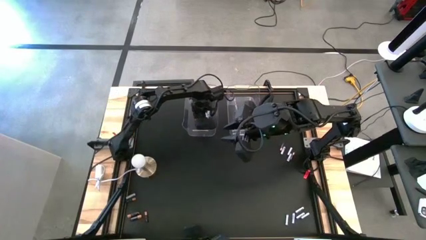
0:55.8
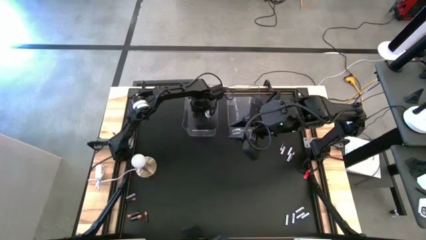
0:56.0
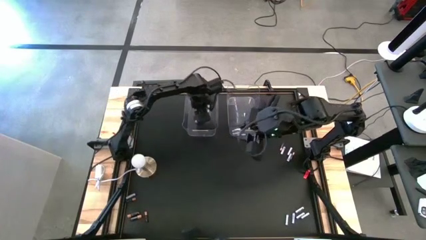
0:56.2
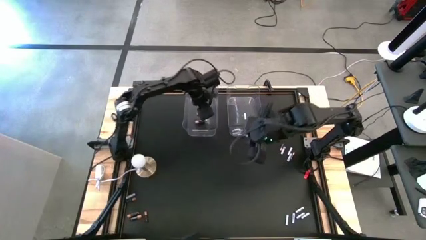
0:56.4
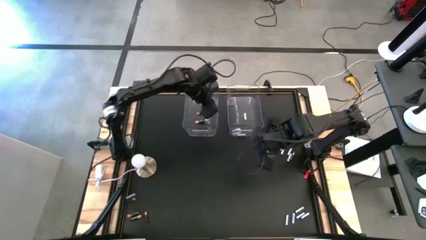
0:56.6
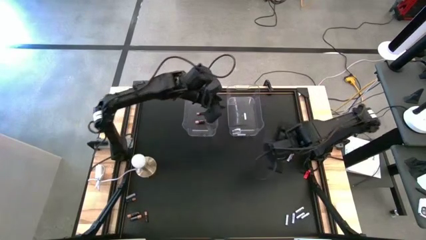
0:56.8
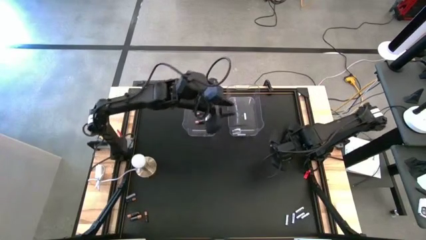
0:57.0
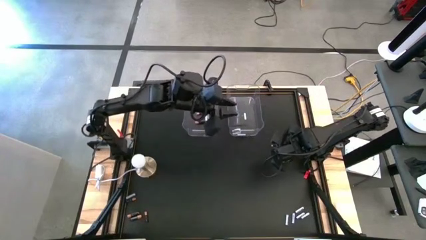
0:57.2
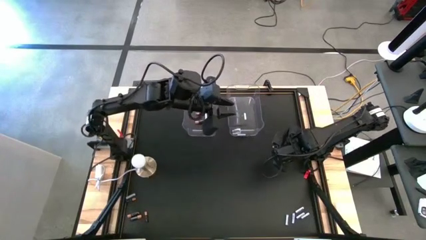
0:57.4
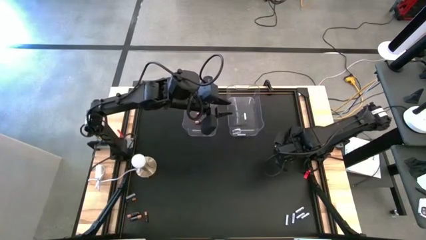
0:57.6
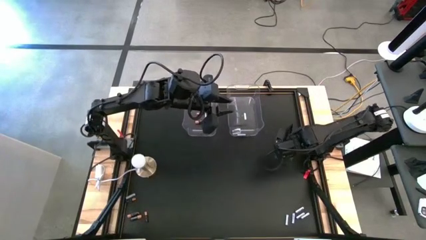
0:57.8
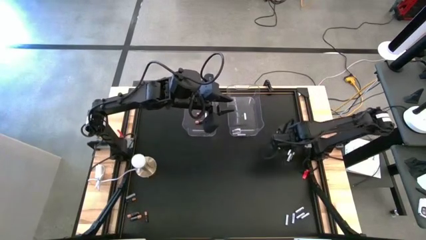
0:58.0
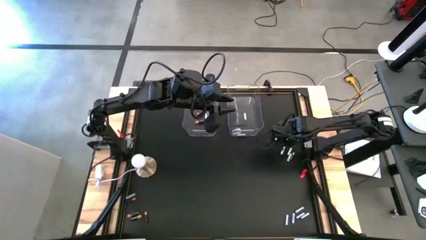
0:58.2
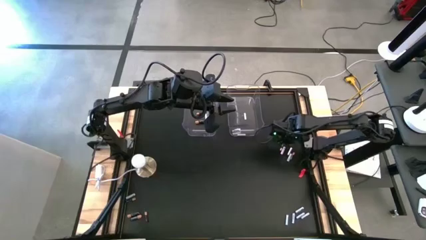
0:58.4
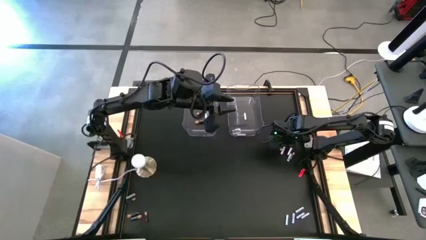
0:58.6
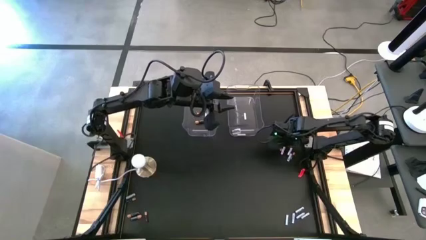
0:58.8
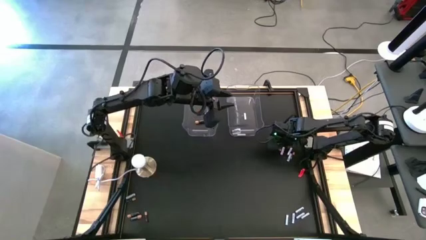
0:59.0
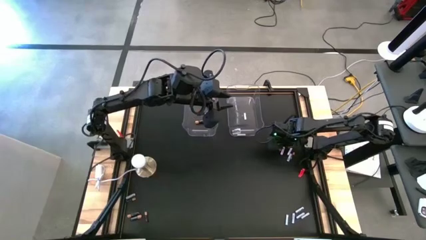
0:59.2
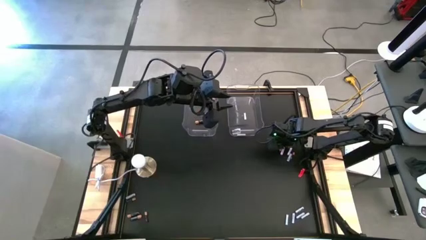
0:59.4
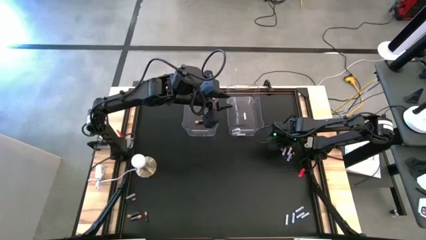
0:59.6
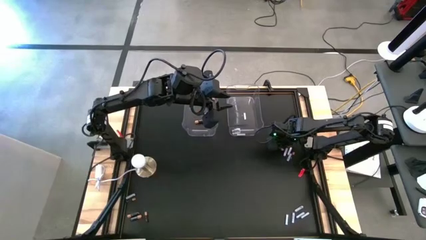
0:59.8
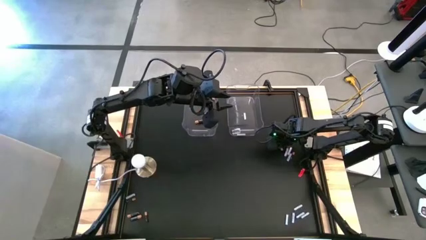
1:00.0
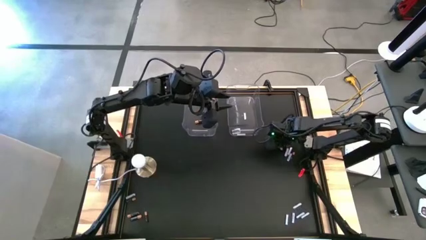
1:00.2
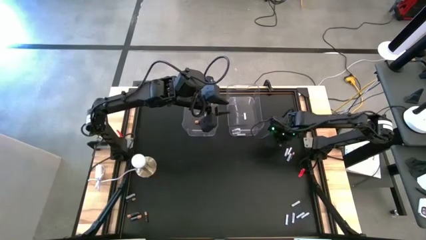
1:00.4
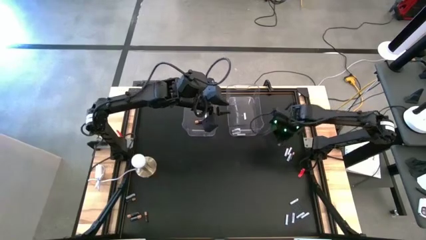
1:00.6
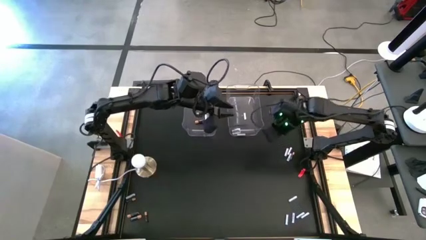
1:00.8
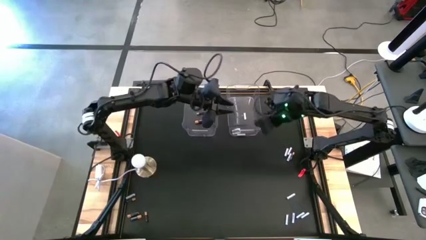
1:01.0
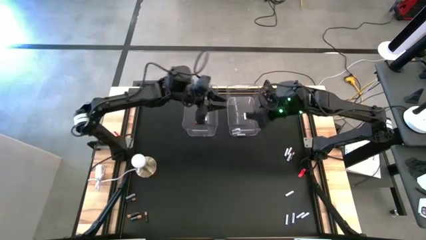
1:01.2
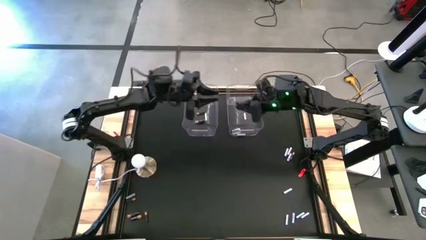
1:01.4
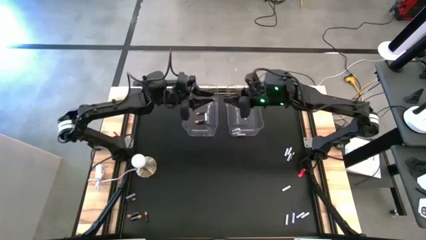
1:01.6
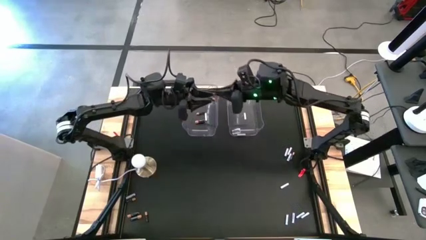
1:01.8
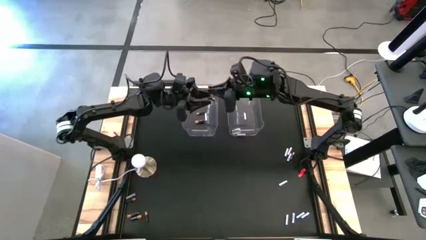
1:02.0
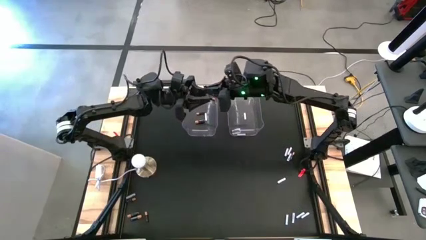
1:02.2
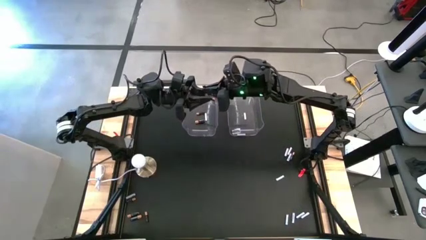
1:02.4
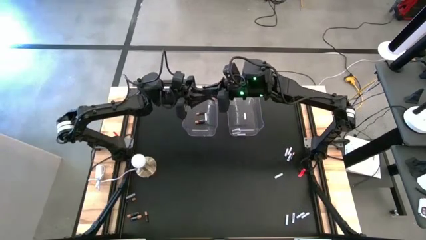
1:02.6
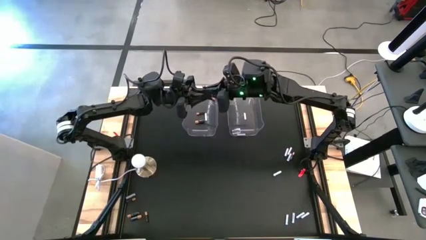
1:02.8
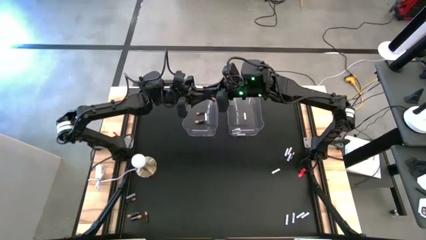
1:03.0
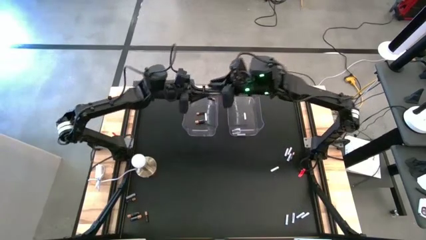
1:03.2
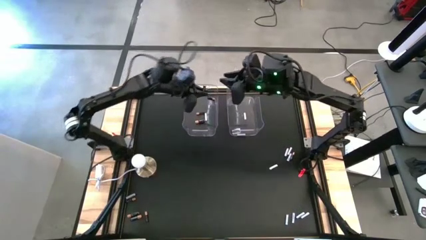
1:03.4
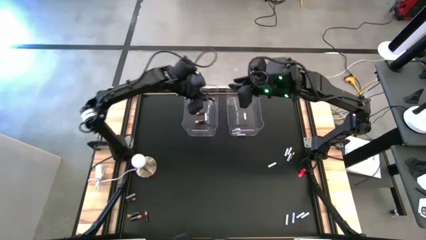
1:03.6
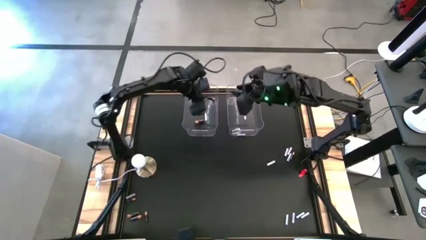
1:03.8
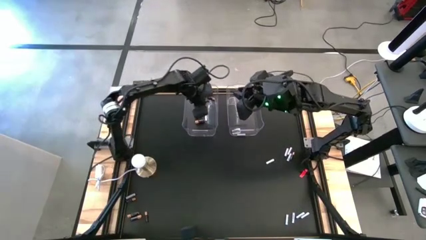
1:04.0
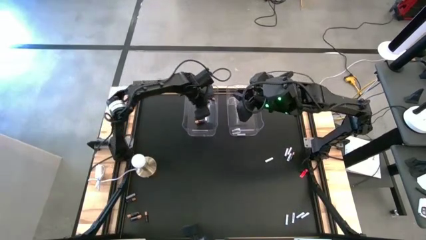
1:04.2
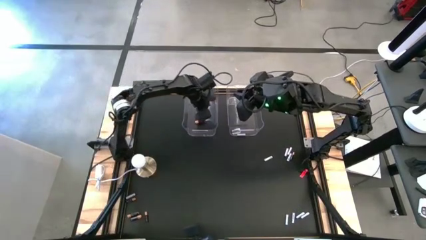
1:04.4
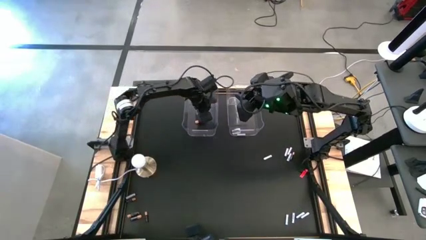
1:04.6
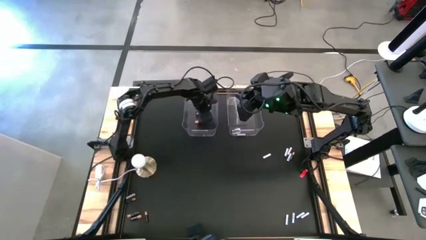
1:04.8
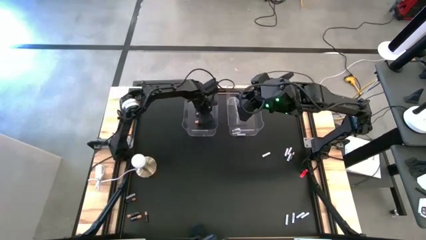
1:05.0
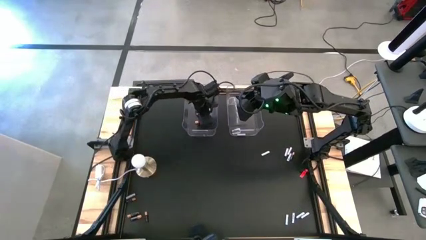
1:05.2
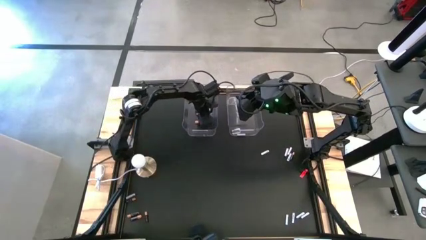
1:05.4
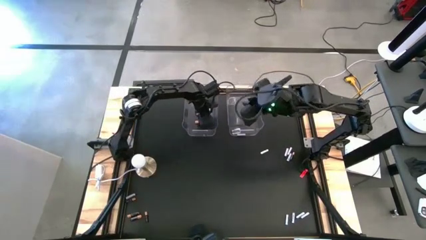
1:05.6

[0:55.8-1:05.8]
Task: Sort batteries
Put the black battery into the left transparent bin

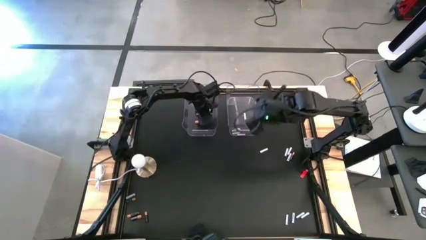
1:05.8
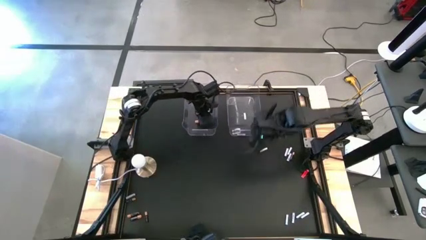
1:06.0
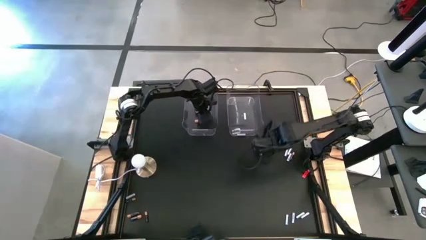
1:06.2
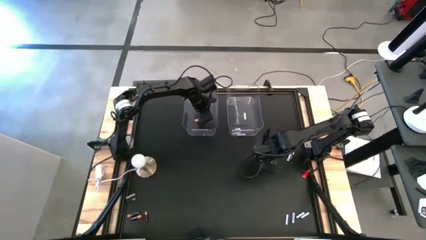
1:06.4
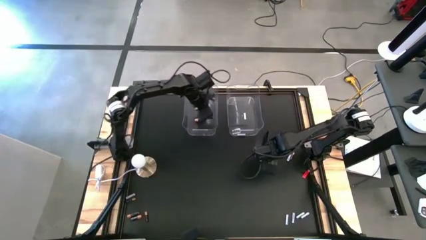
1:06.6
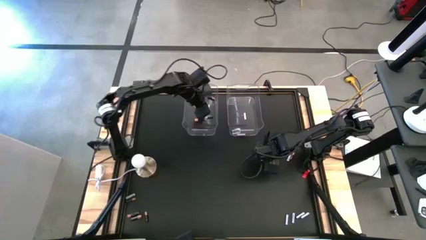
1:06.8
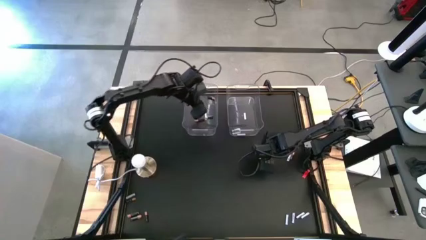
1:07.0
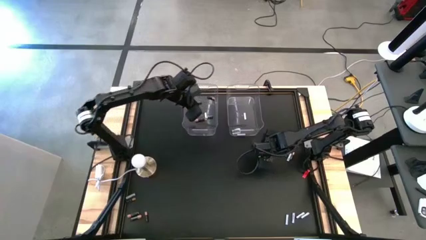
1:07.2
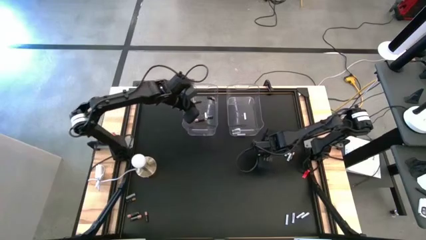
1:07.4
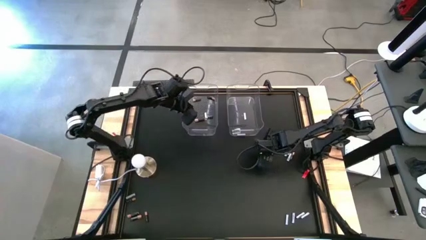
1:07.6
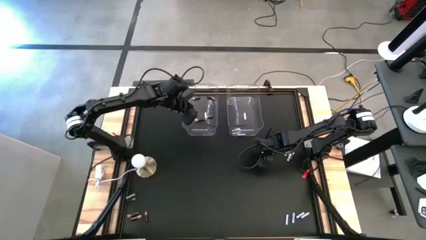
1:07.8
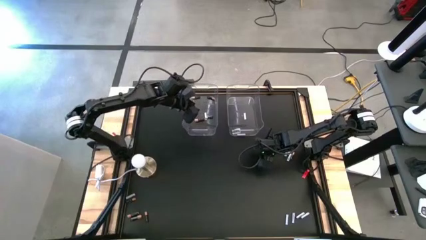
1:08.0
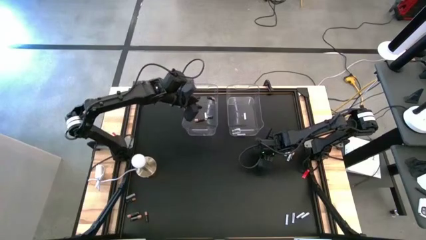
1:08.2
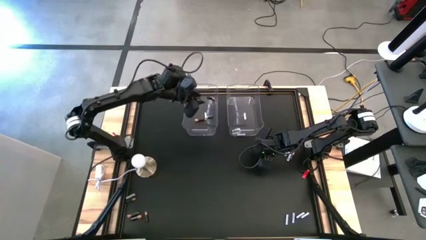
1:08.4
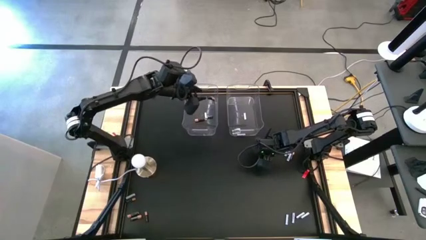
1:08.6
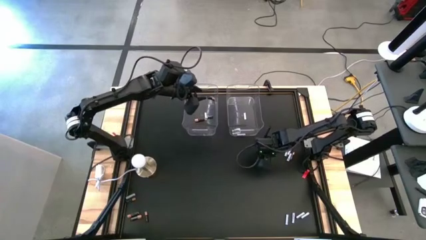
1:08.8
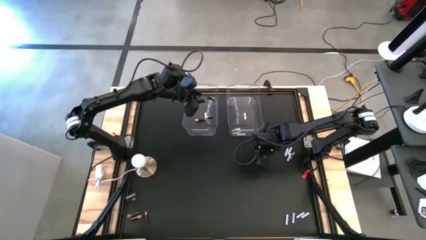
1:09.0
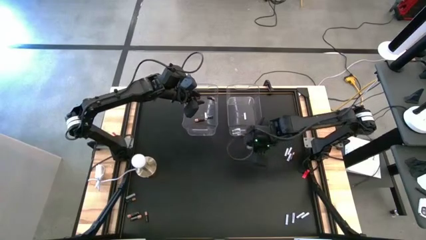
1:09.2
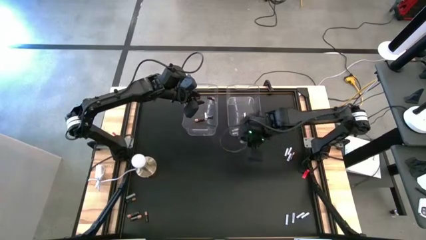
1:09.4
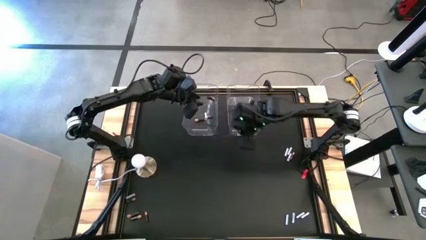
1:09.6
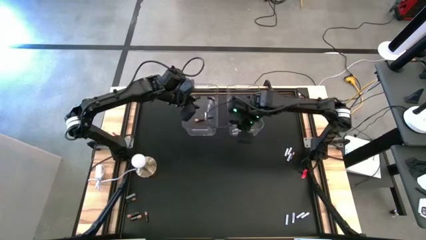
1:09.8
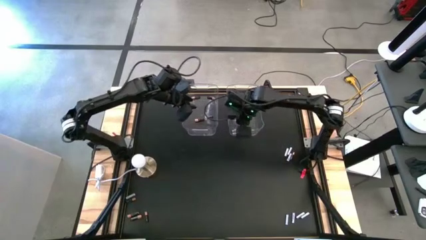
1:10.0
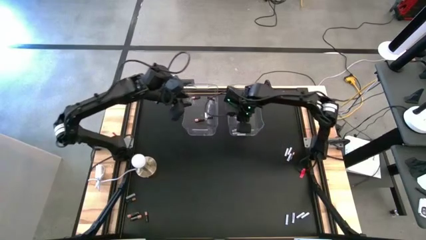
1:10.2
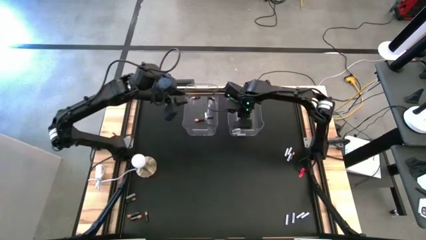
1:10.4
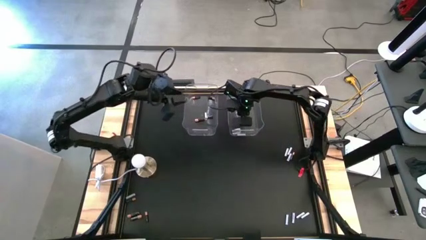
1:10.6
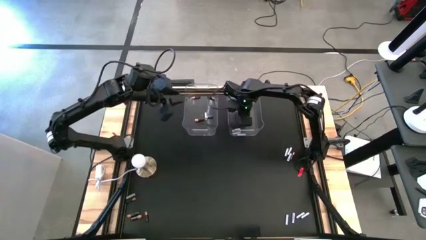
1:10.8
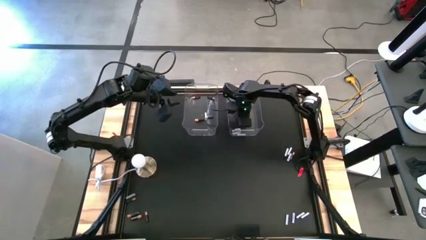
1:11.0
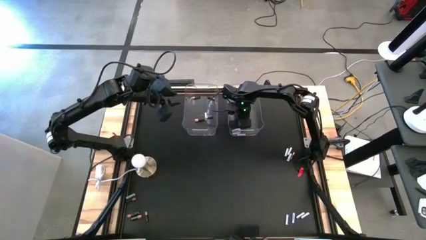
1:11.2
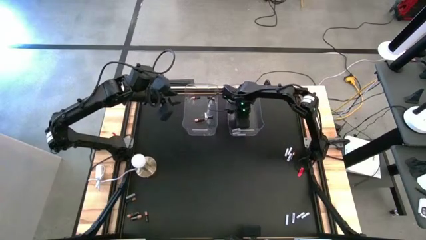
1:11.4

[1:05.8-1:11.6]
Put the white battery into the right transparent bin
